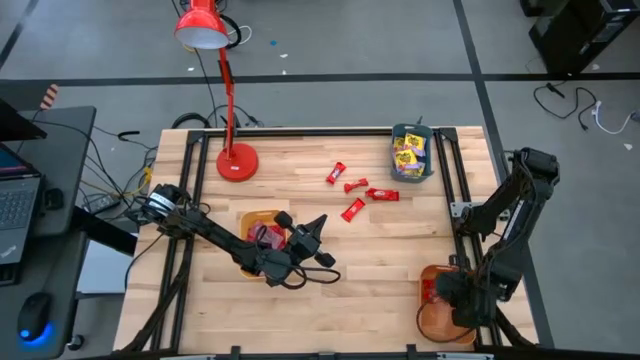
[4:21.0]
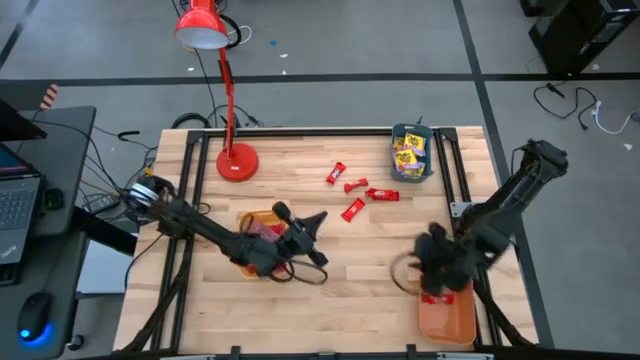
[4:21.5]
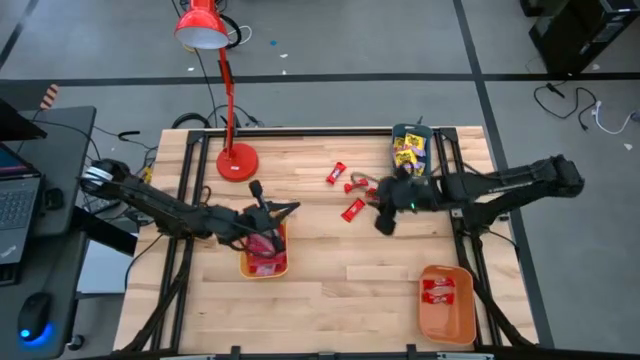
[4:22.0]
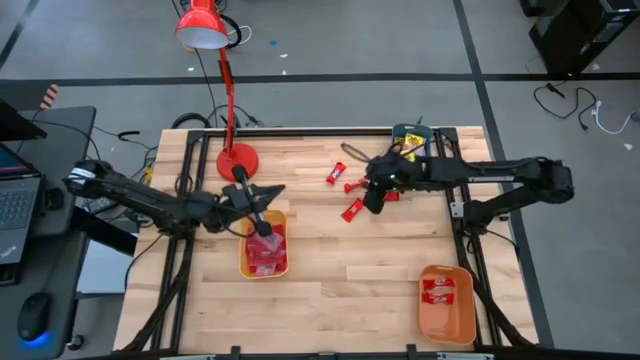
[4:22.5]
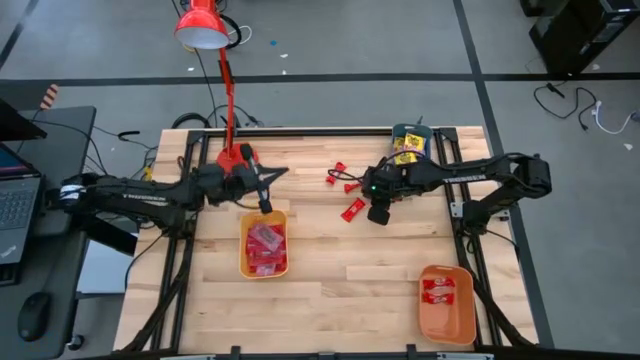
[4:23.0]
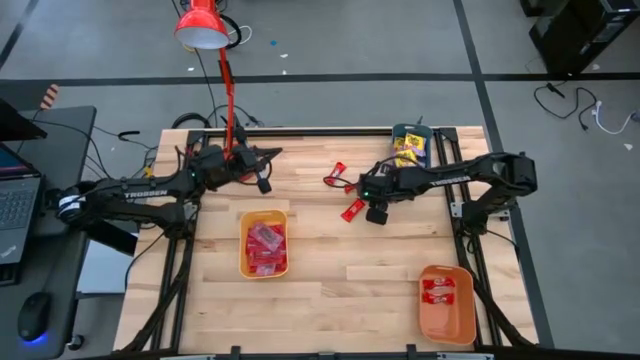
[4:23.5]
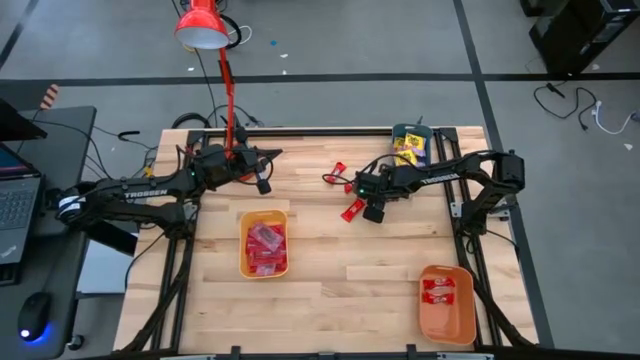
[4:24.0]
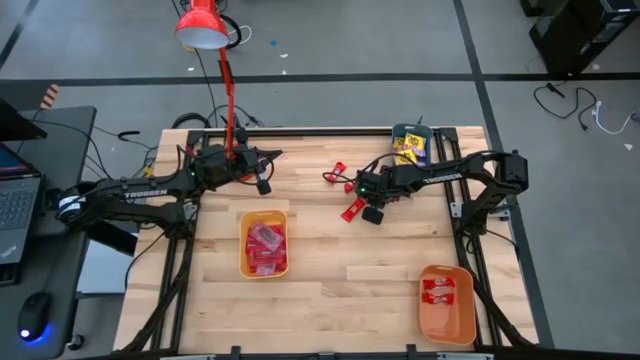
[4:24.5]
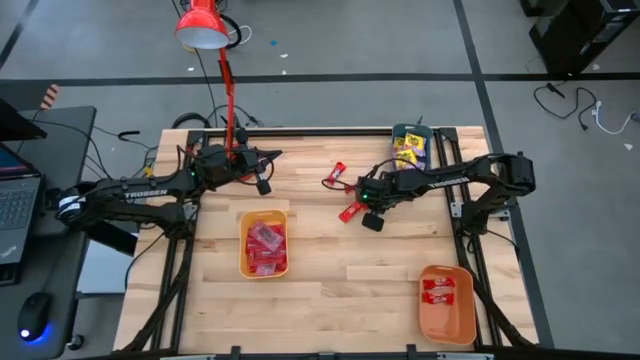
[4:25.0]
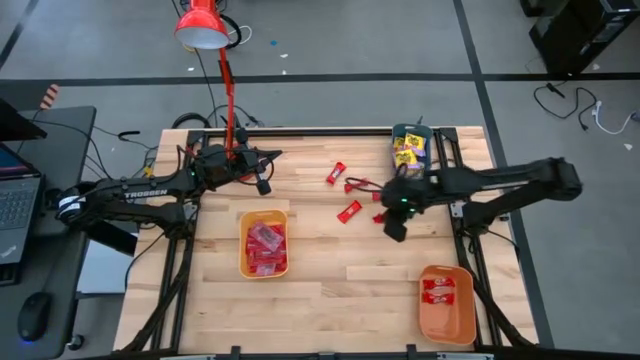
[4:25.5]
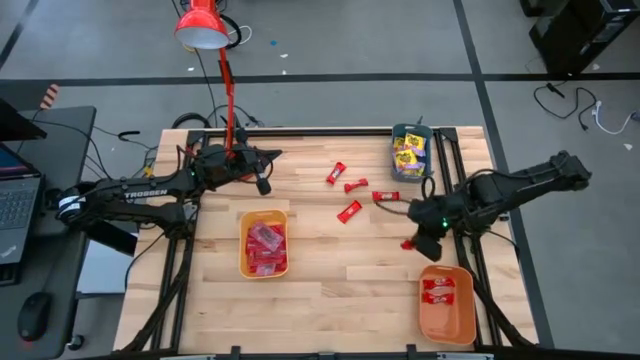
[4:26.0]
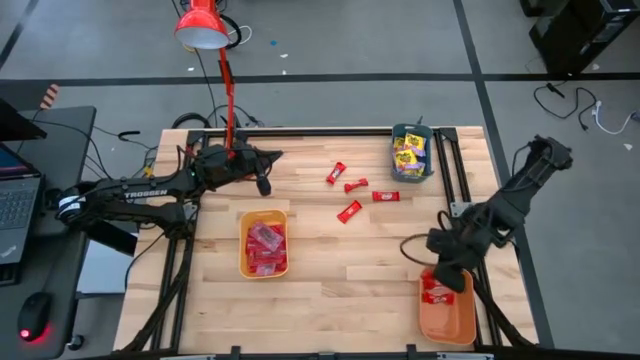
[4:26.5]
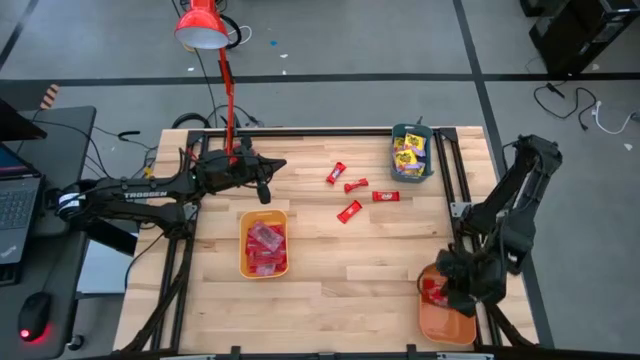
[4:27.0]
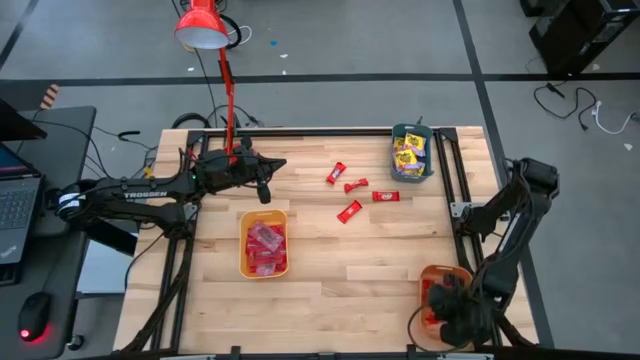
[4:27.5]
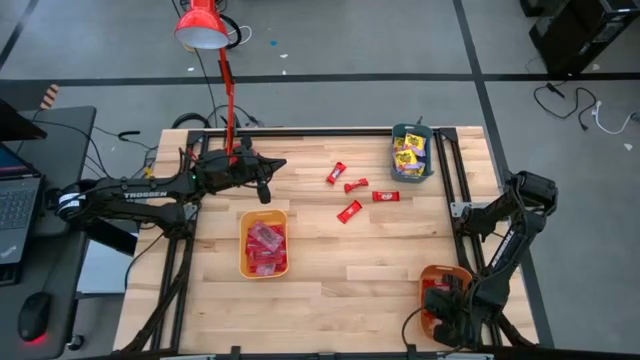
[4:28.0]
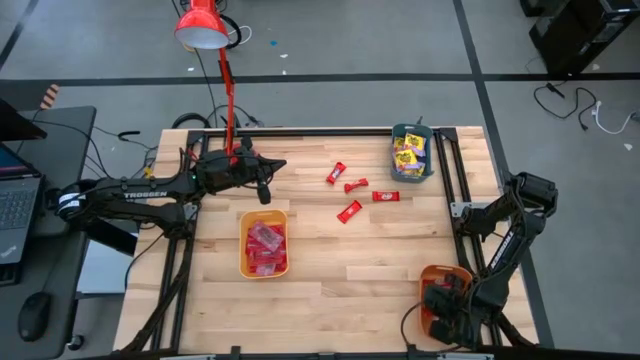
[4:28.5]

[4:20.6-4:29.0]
Task: Sort candy
Put the red chocolate into the orange bin

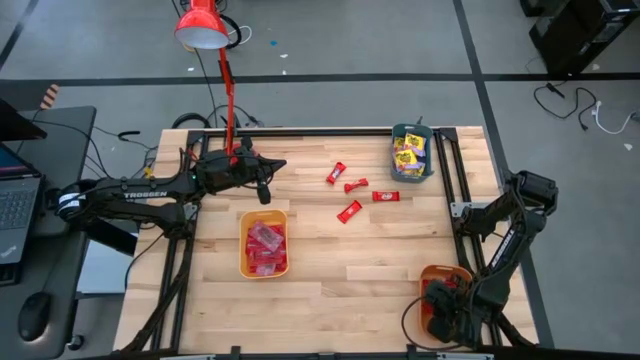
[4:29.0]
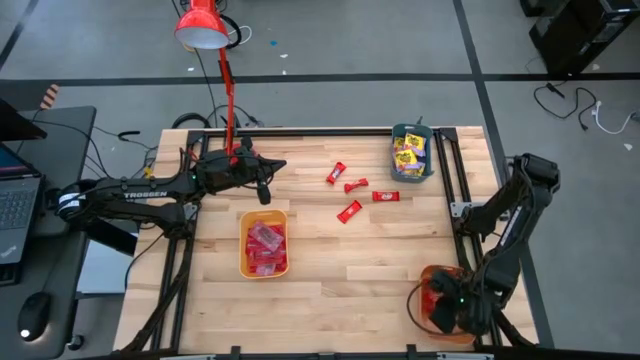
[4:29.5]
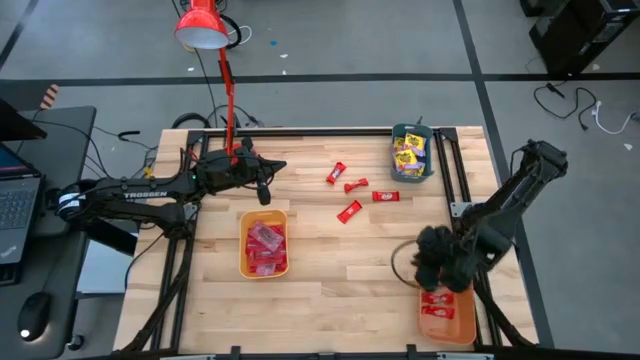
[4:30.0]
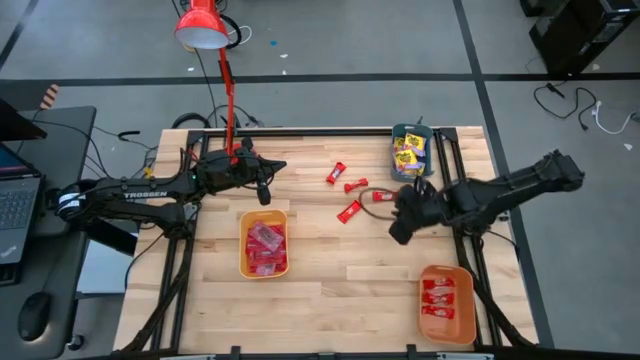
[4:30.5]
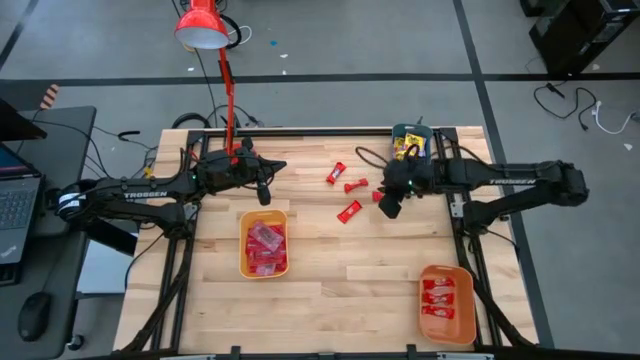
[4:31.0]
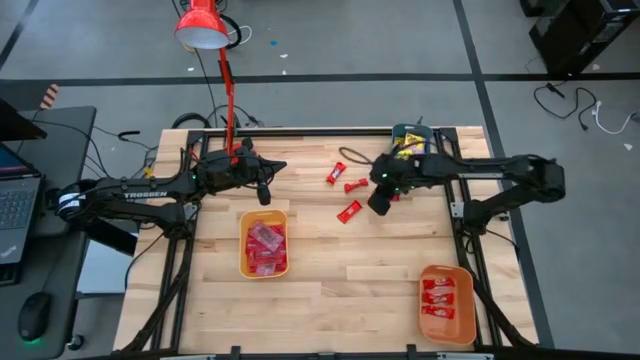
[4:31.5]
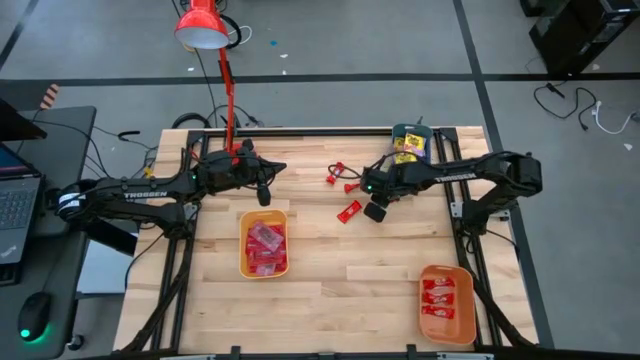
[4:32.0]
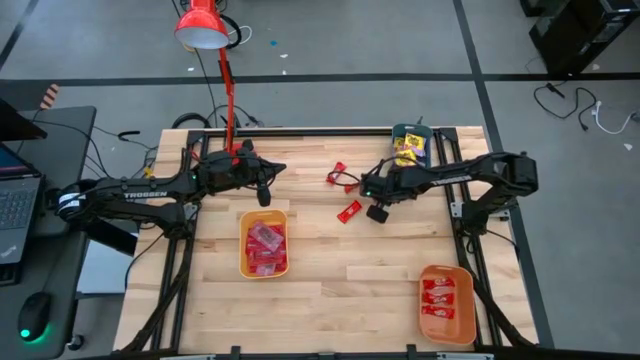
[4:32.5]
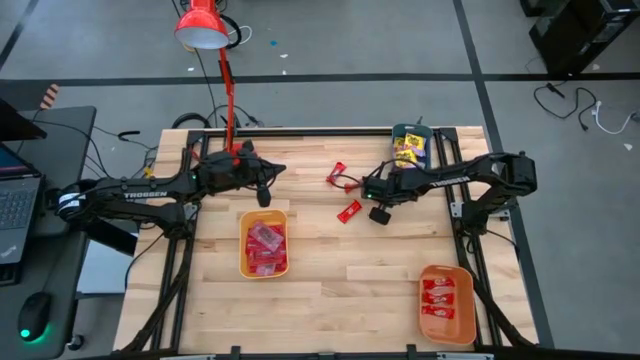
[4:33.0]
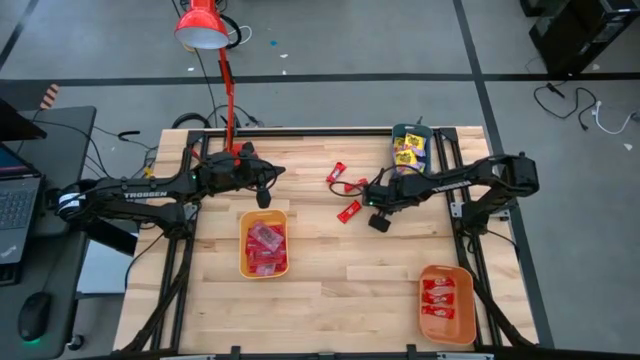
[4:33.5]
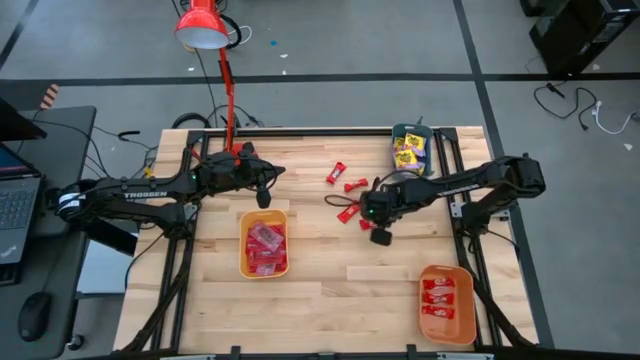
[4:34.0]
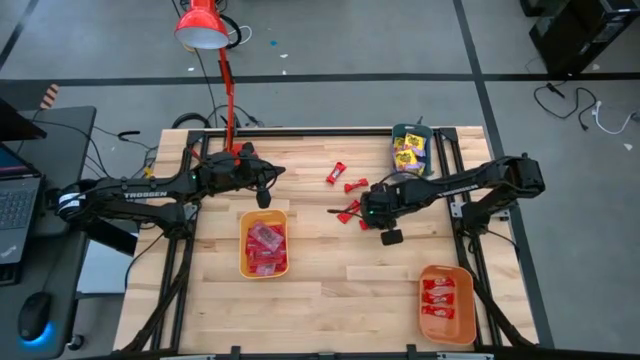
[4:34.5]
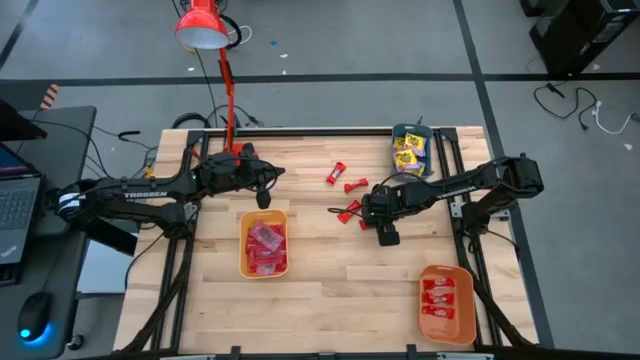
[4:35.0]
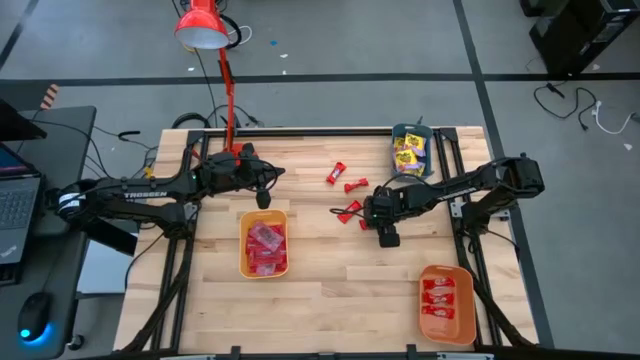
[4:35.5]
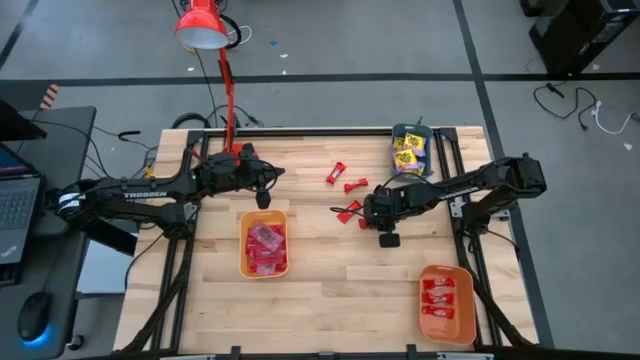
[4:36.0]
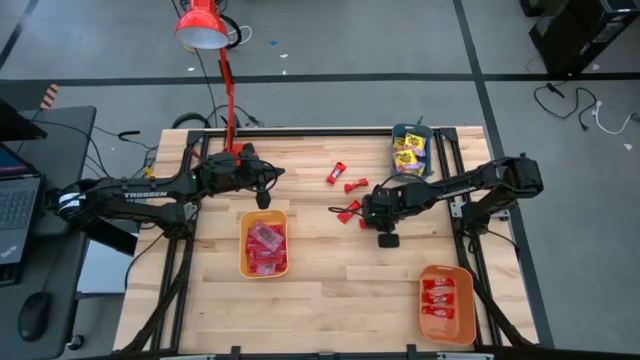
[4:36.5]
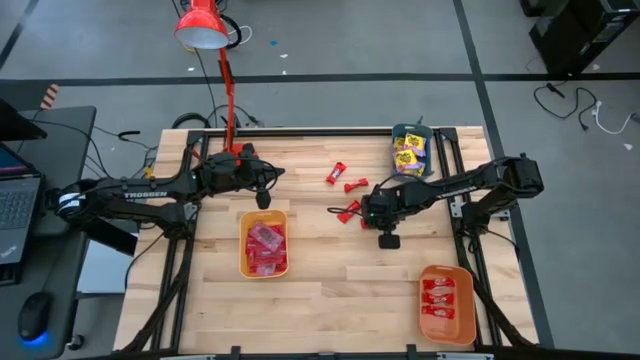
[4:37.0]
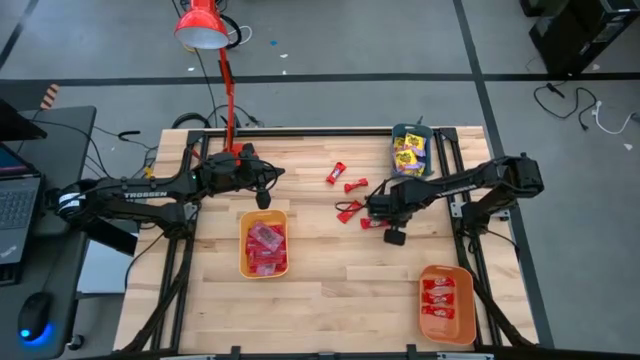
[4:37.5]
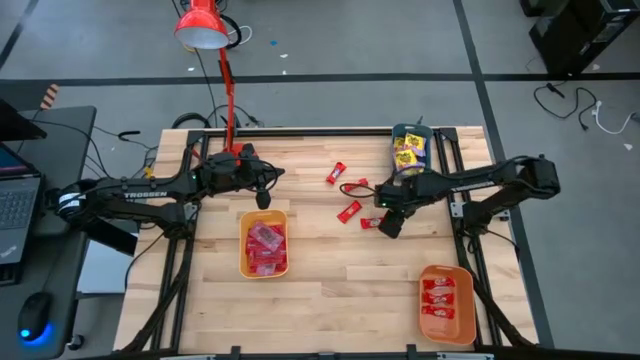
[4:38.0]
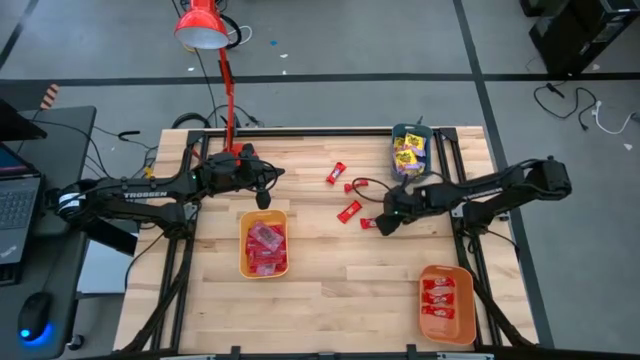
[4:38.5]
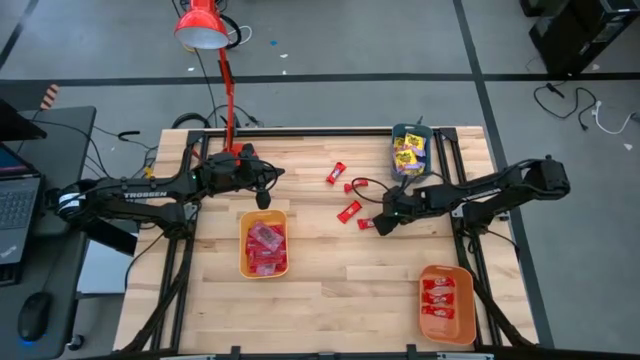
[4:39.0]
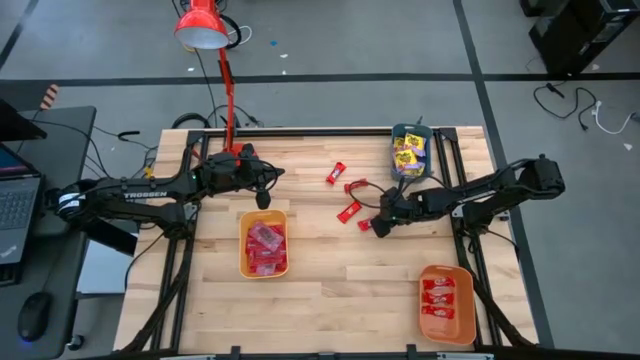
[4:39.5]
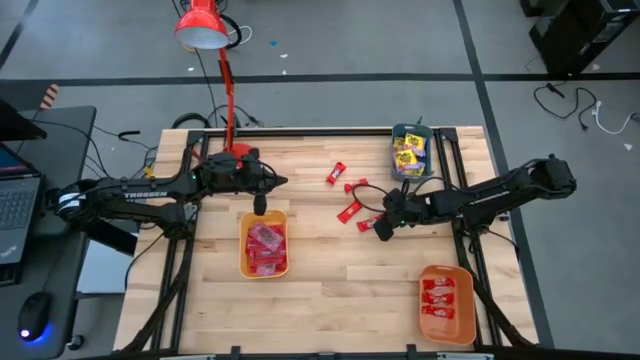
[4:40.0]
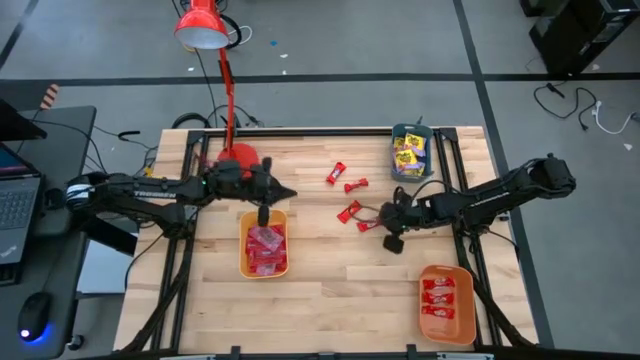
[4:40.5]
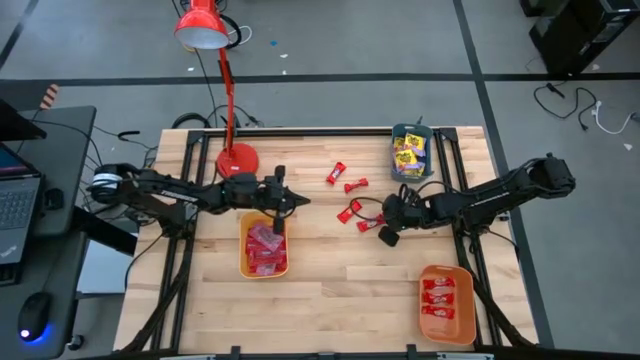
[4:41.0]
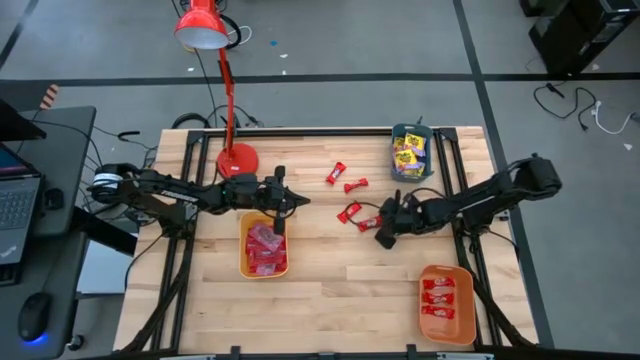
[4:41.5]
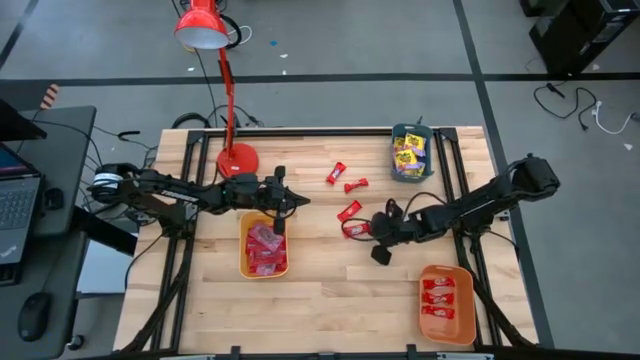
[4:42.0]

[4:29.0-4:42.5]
Put the red chocolate bar into the orange bin
